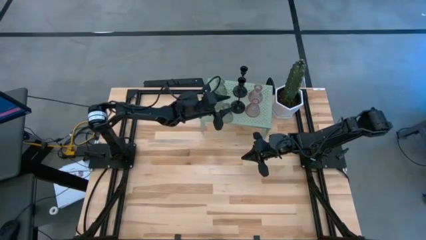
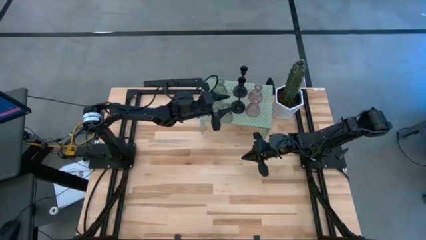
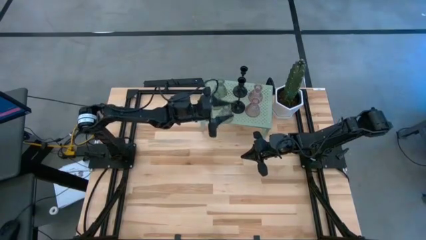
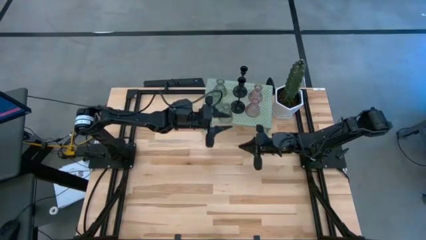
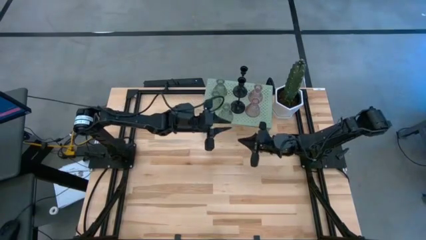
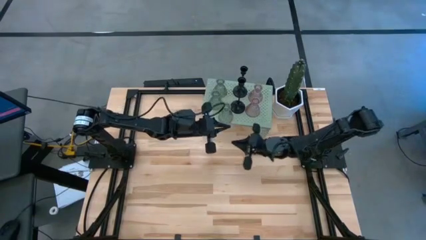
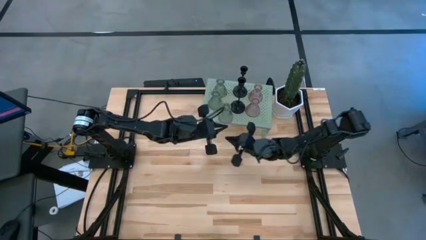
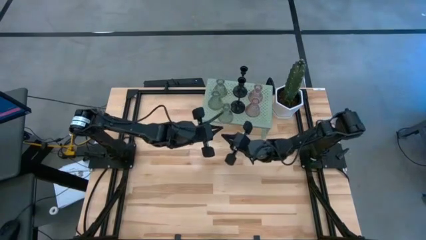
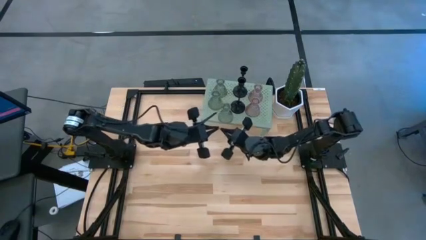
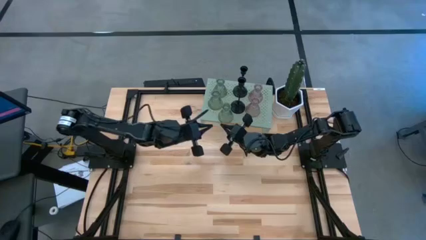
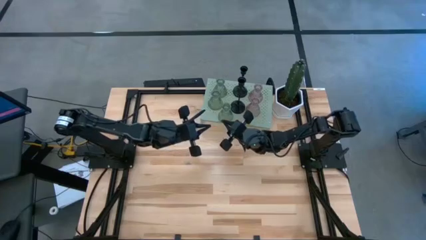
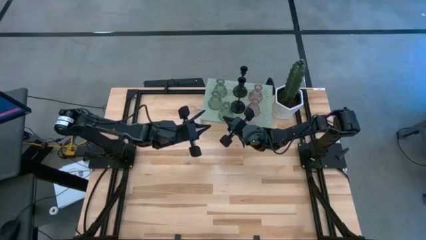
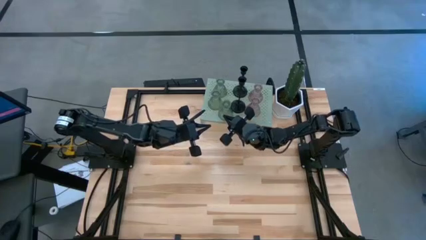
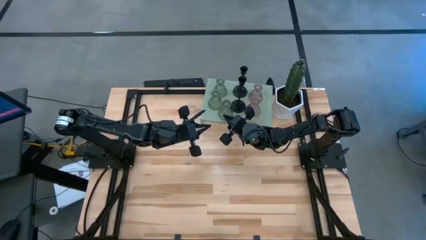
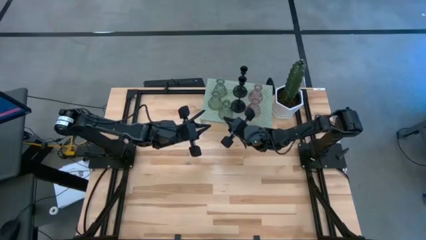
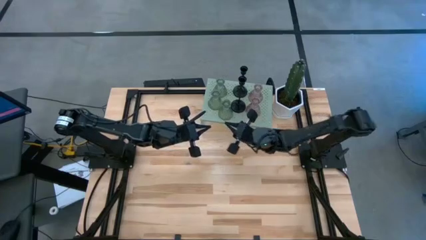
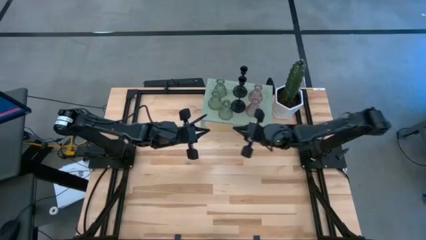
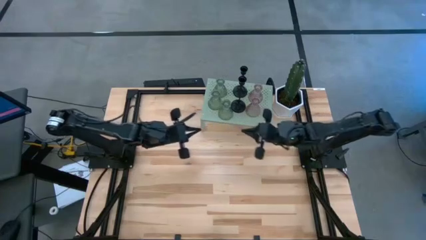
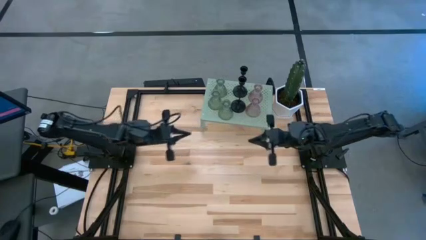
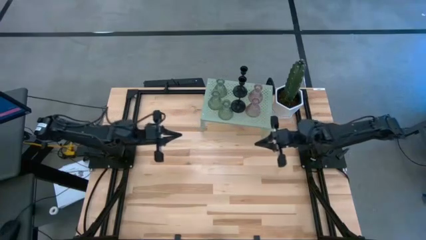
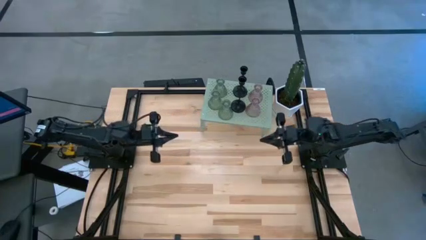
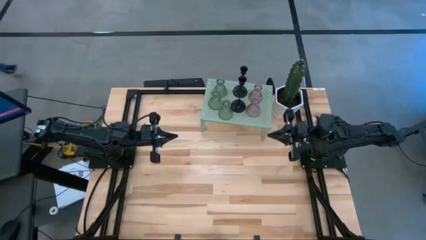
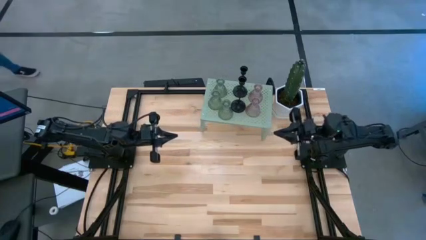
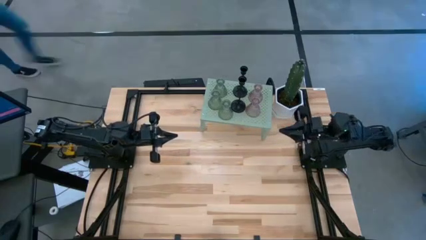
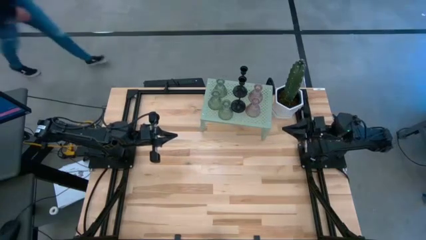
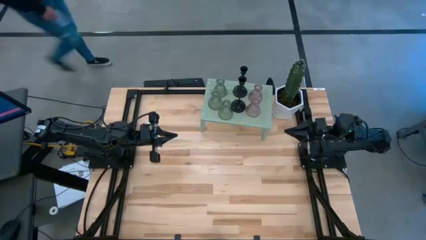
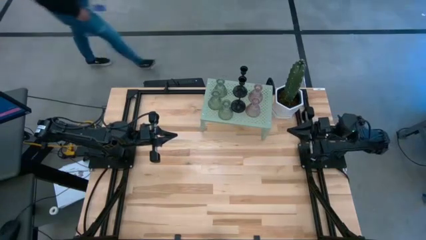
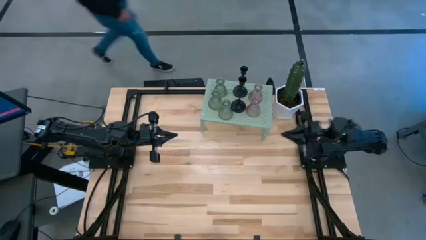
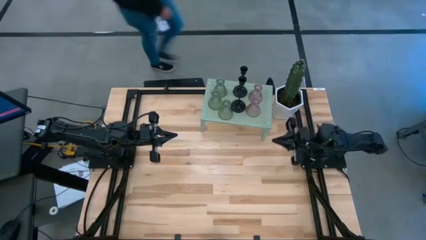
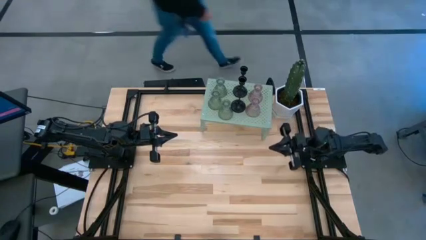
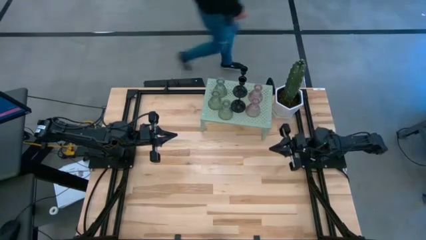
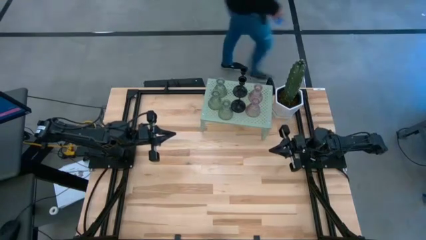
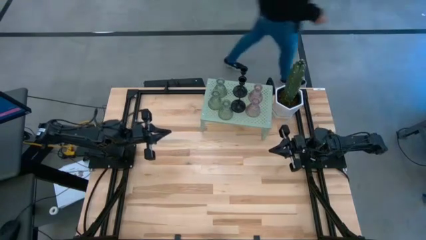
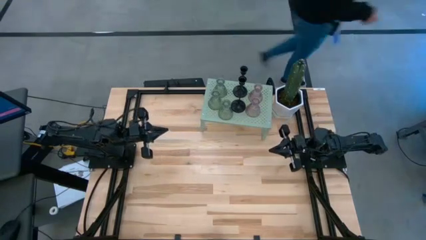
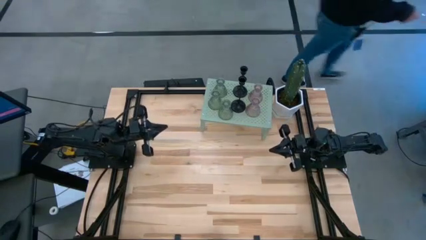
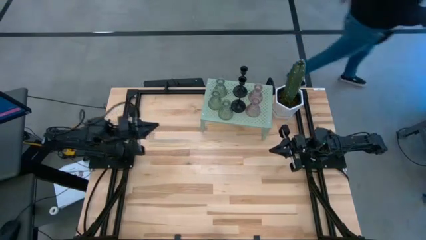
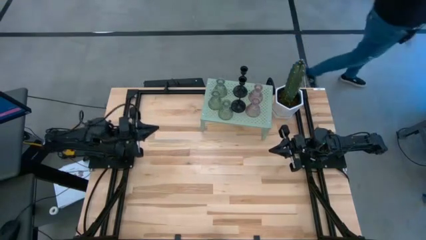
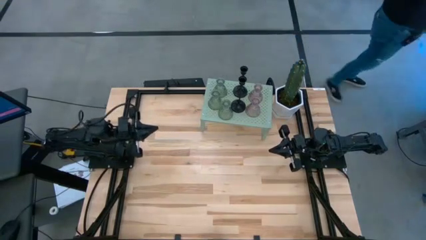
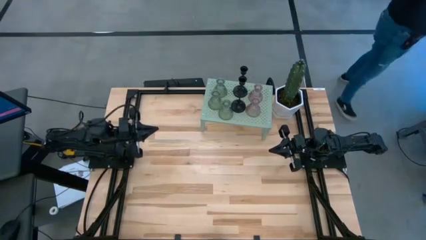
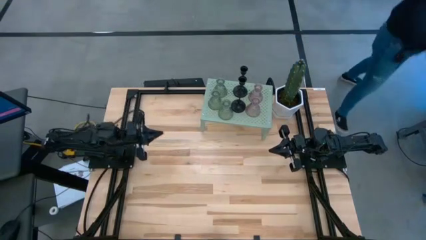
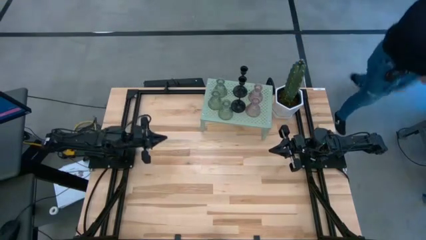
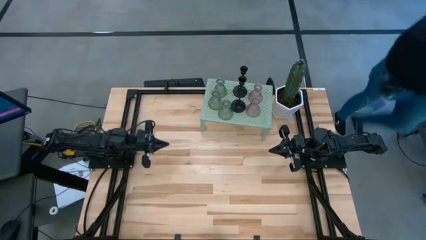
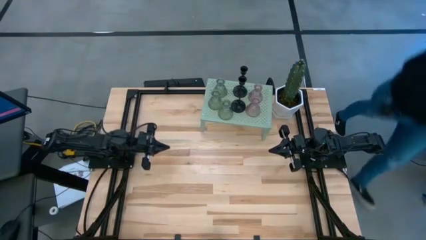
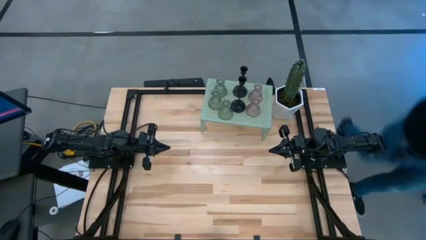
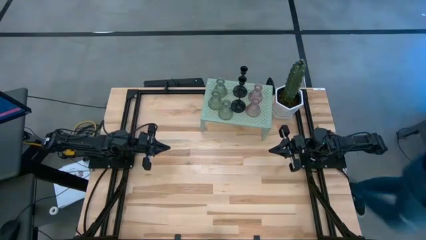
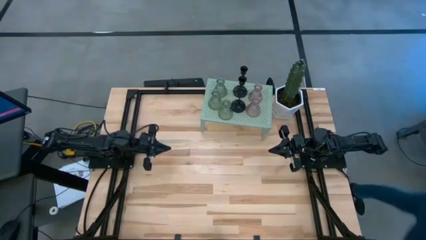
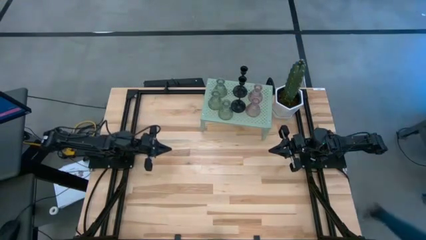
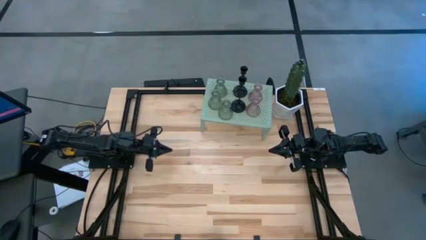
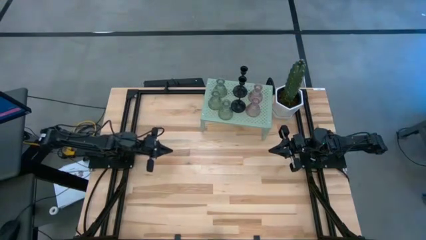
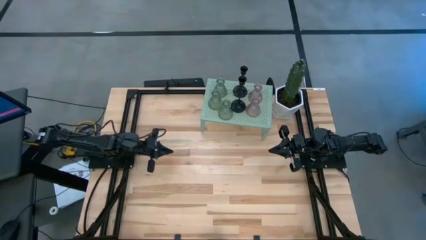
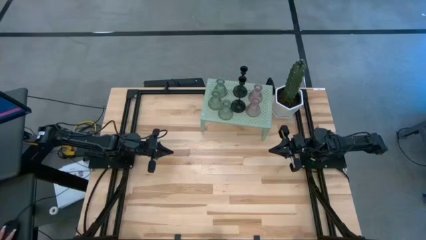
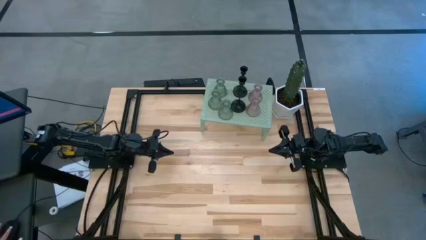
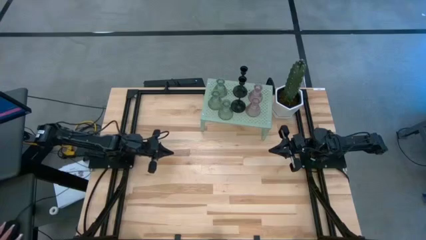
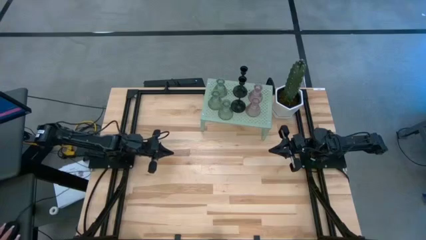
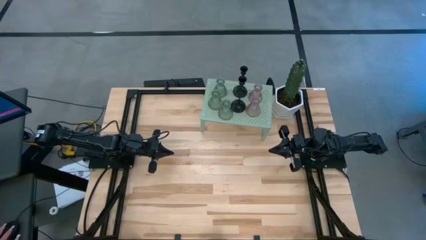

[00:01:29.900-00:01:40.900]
Task: Pick & Place candle stick holders
Return to Home Position

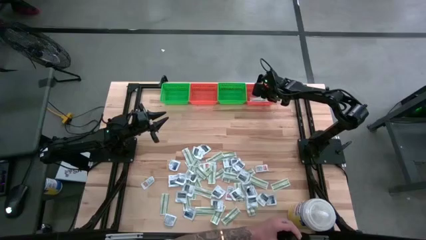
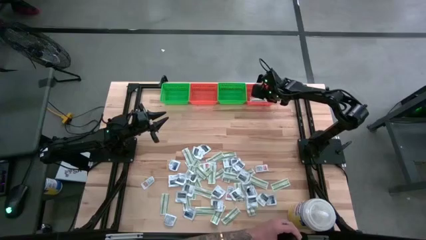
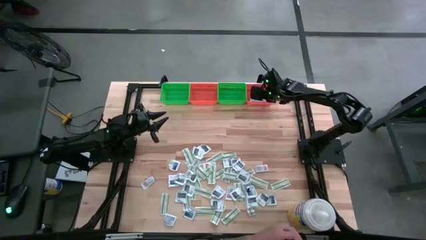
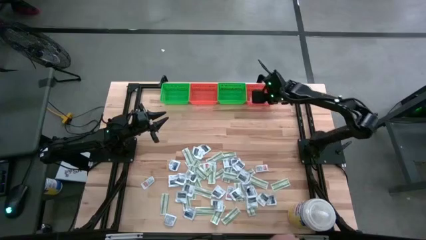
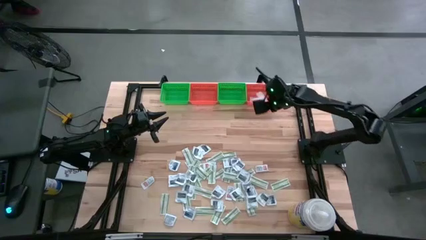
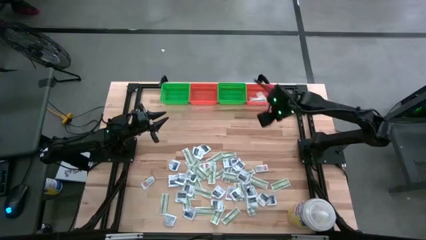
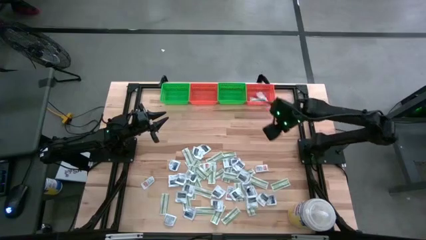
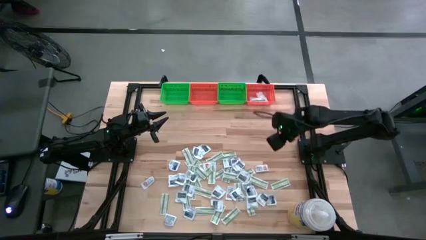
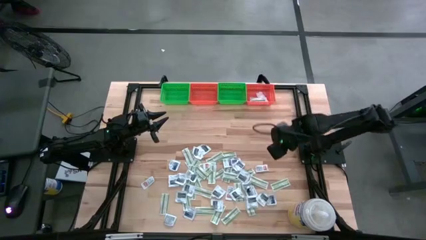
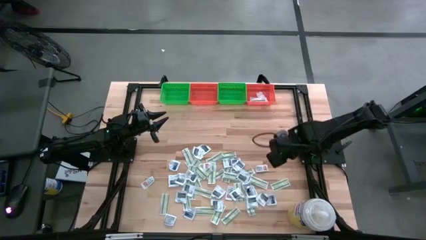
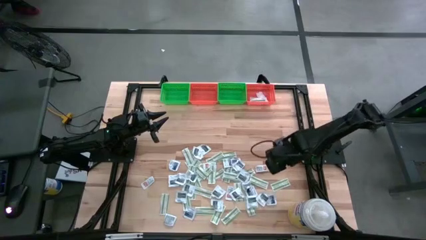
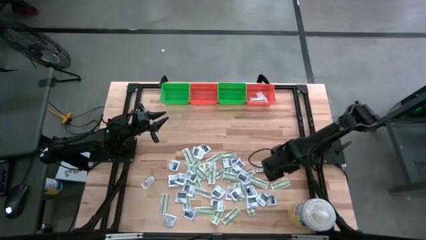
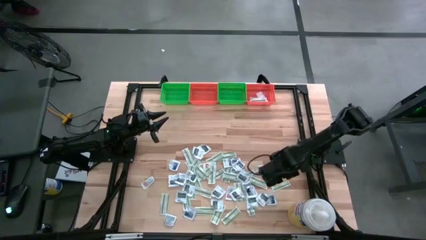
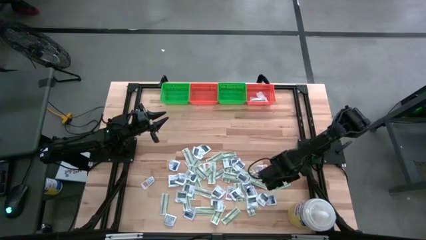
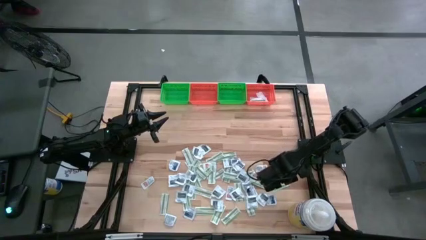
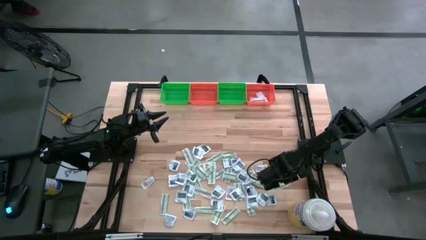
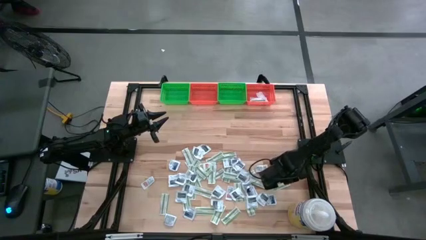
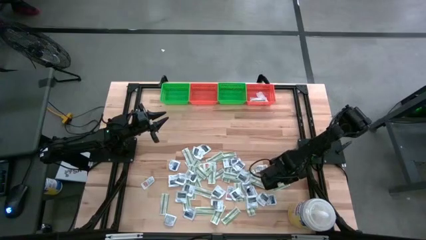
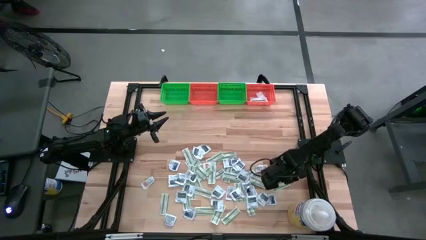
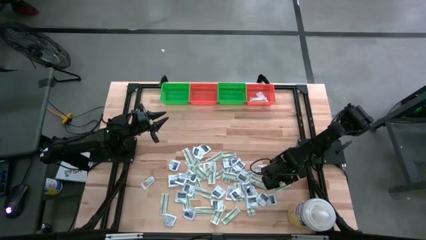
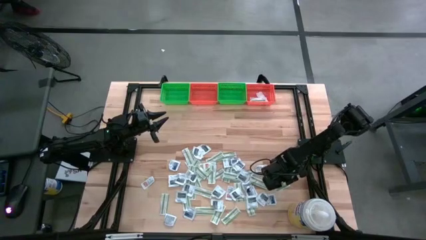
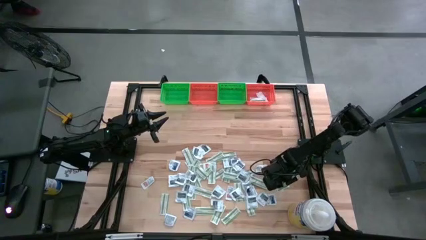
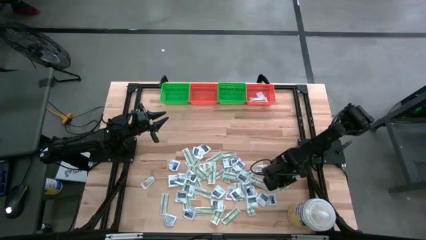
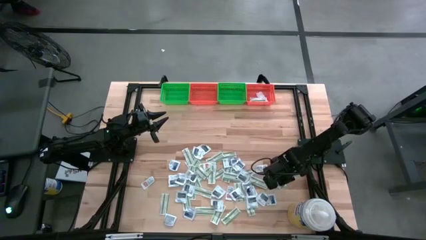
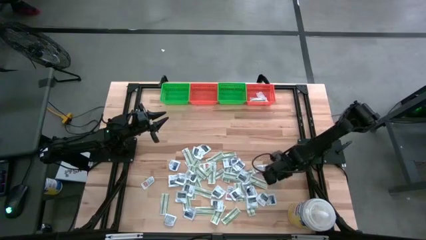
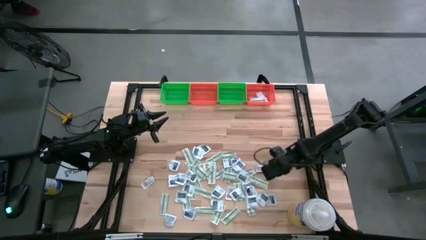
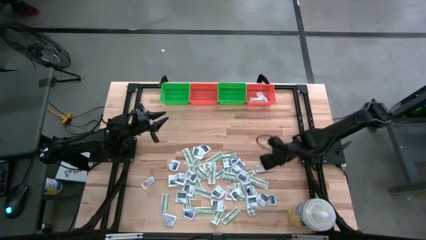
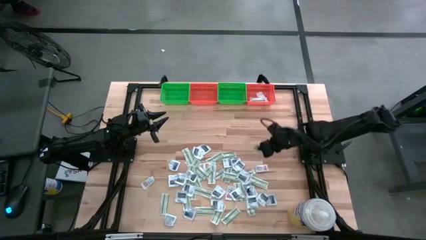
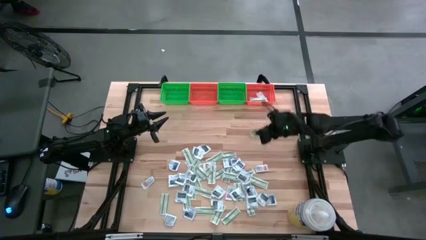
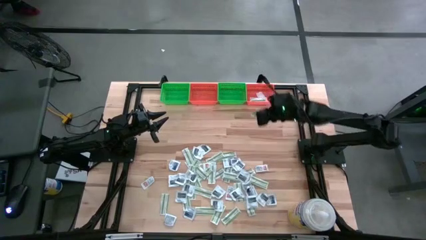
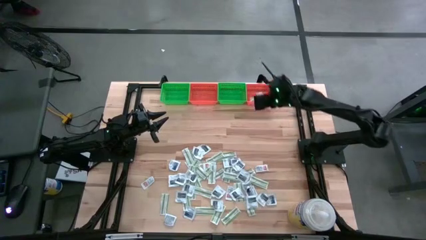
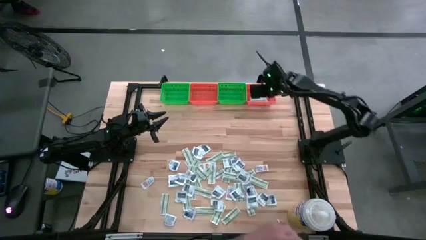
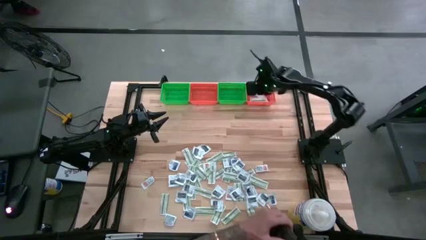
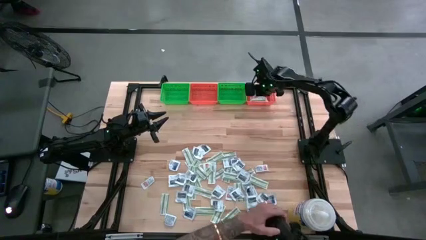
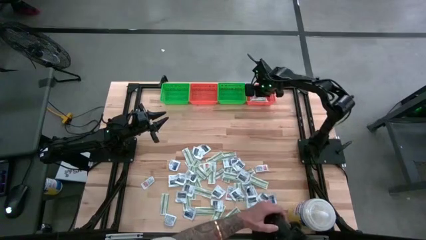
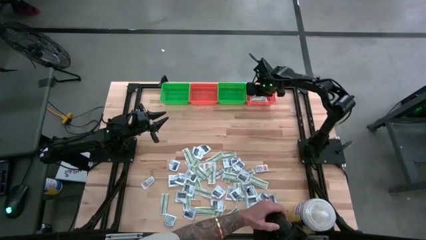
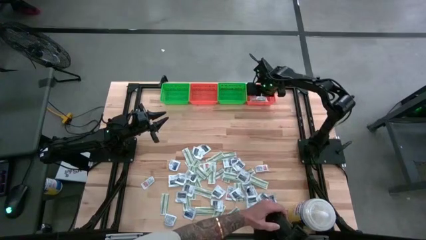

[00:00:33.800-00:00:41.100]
Task: Pick & Place First Aid Supplies
Put the green bandage pack in the right orange bin
